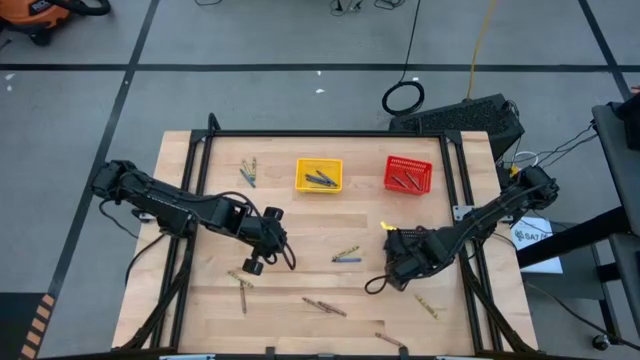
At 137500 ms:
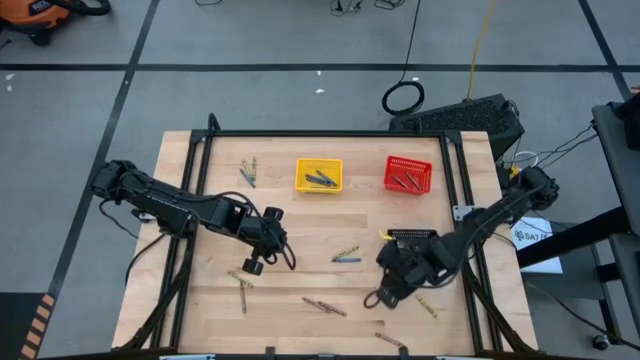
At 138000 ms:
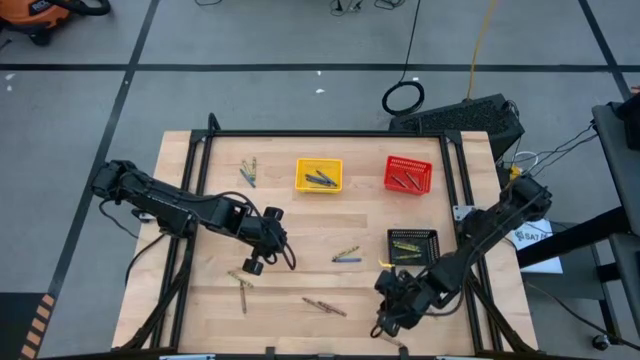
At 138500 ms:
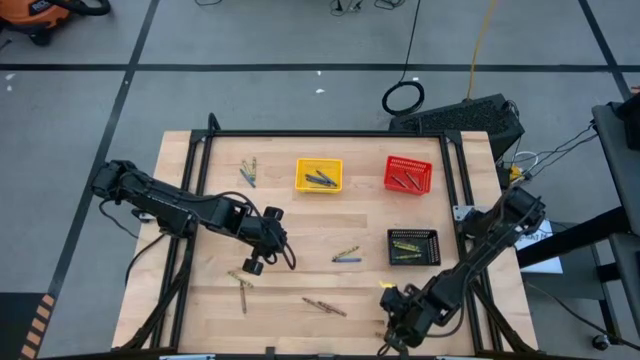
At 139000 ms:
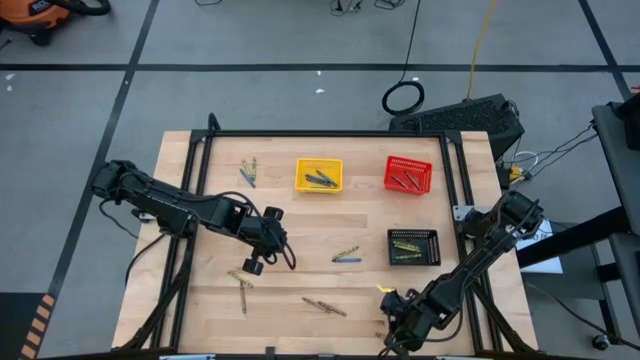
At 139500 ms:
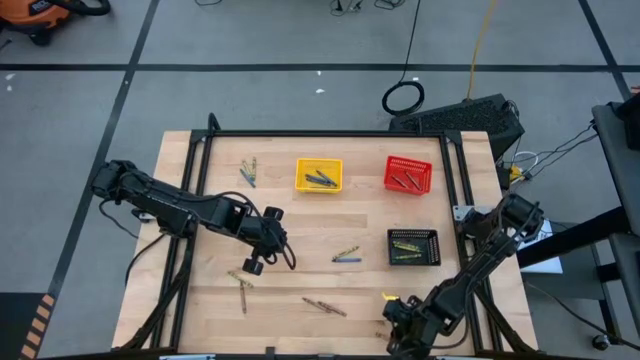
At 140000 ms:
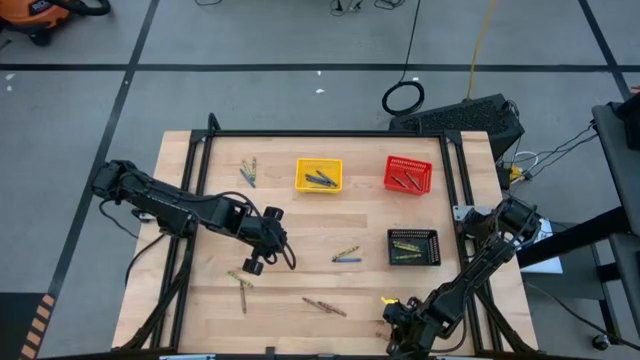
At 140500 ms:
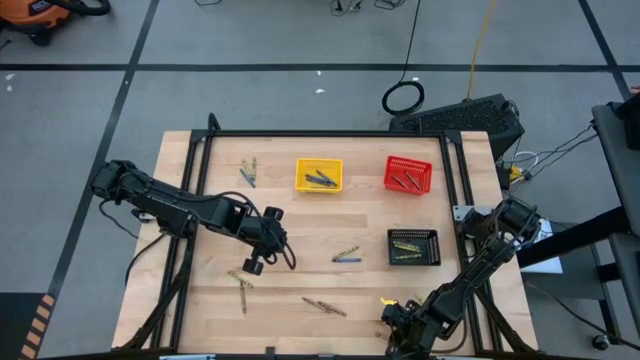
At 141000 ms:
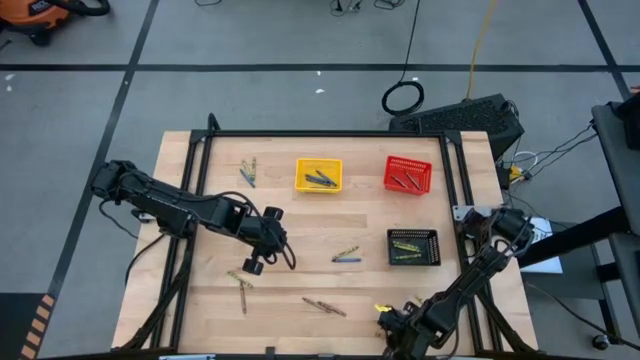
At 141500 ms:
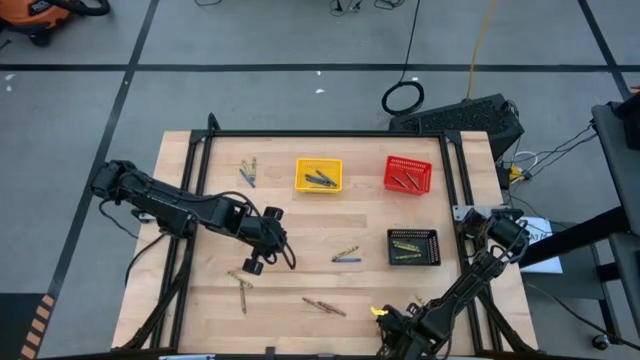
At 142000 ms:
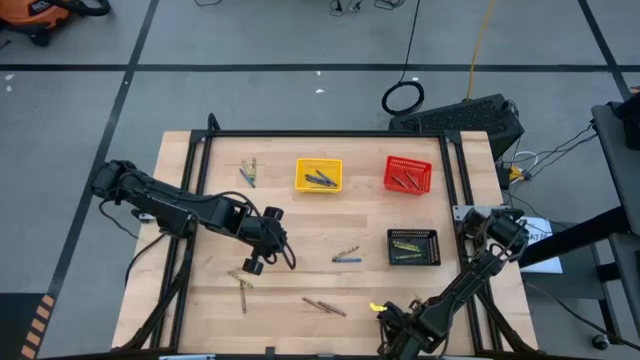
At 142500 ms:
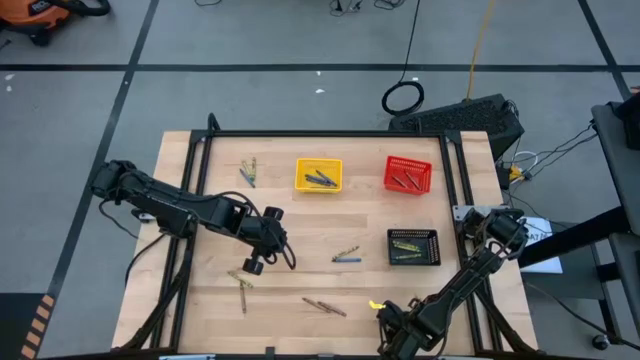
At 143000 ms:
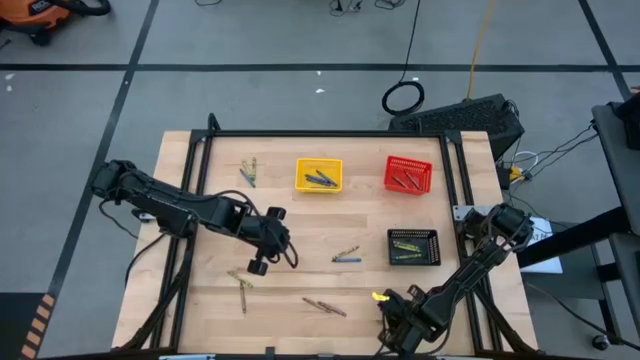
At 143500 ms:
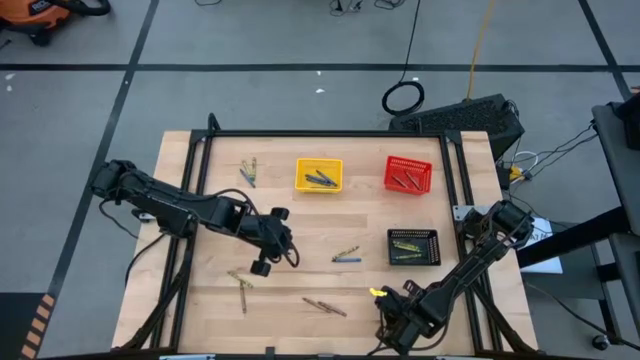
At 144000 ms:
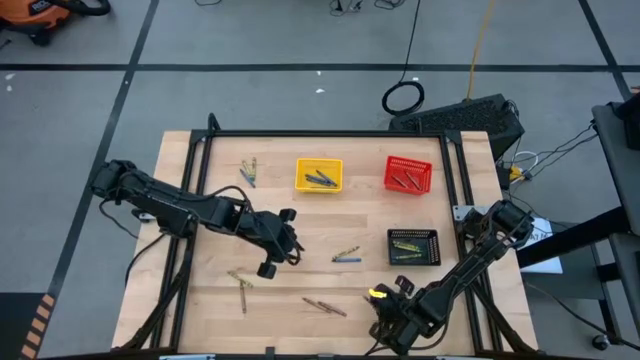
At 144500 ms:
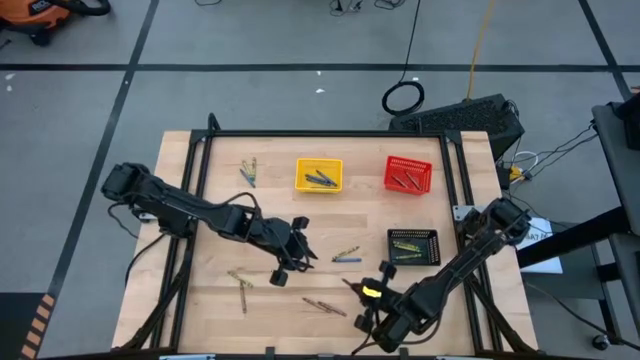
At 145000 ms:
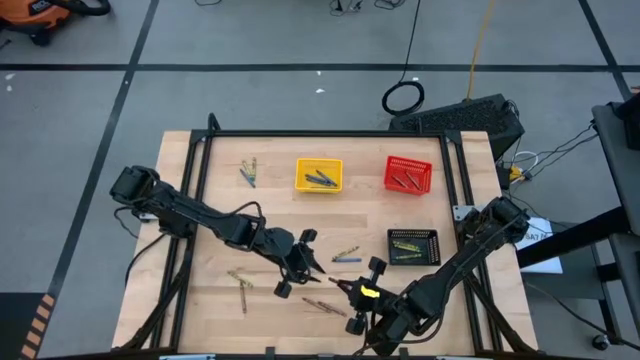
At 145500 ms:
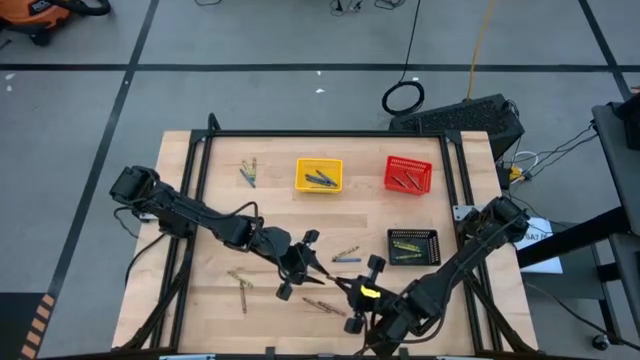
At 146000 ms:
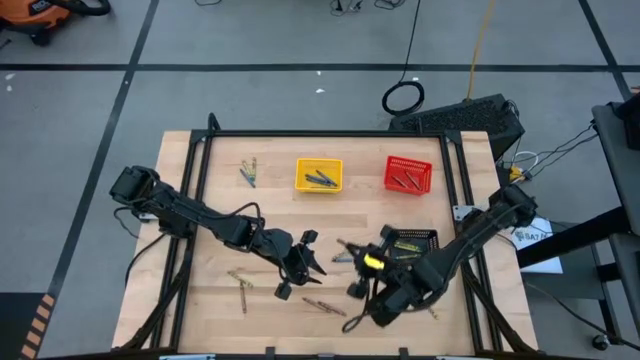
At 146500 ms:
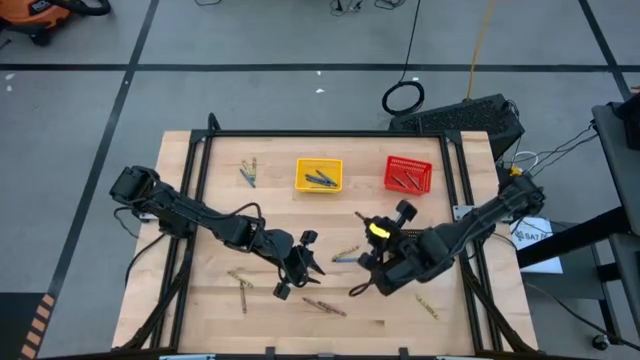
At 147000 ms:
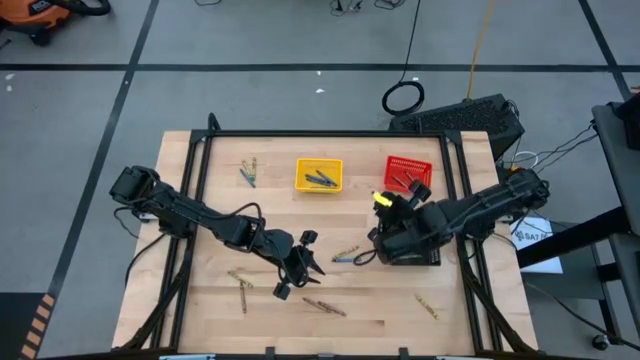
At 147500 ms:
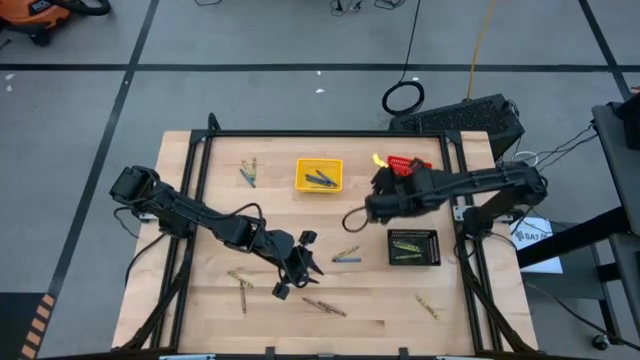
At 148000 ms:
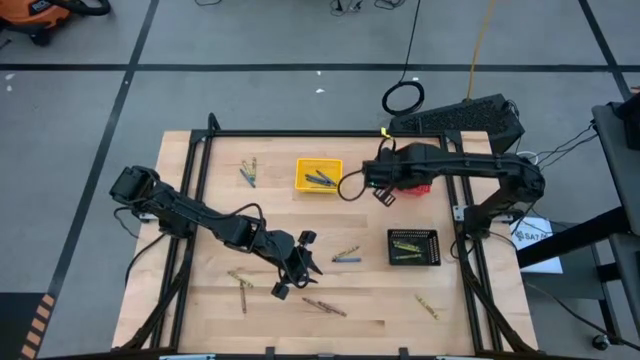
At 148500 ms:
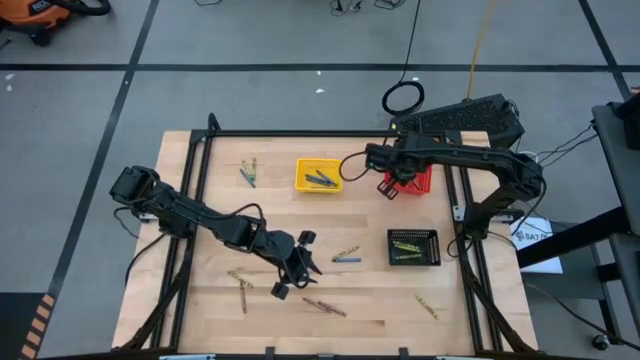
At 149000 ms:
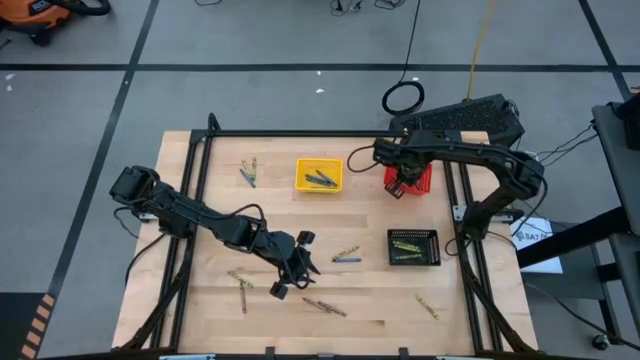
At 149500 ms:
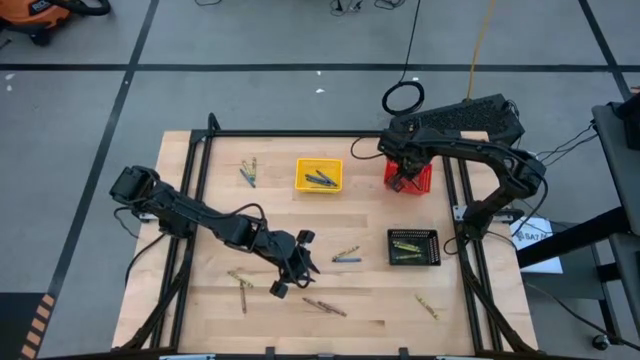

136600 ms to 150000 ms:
Task: Sort crayons
Put the brown crayon into the red bin

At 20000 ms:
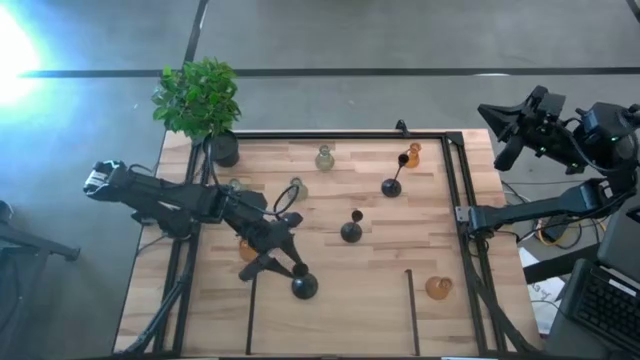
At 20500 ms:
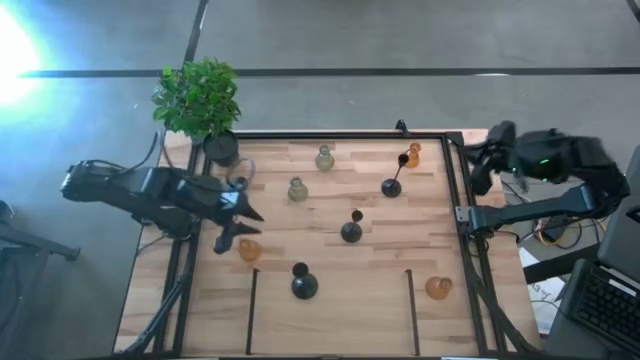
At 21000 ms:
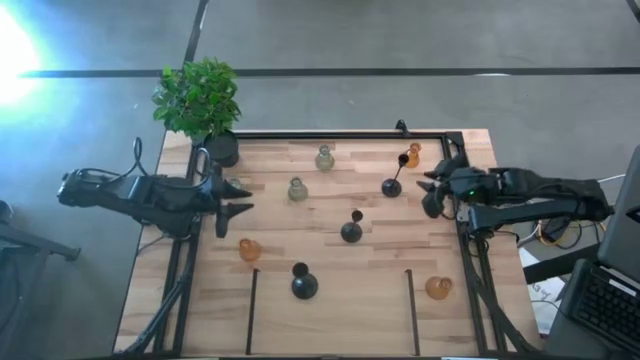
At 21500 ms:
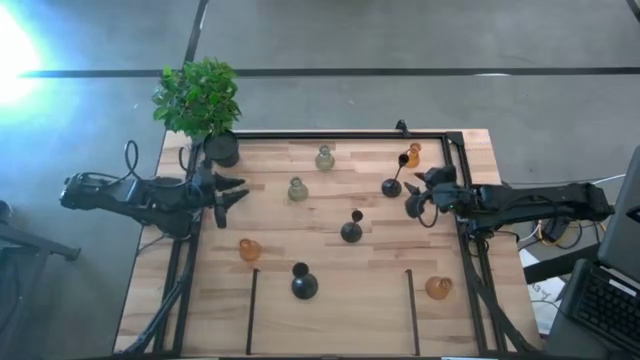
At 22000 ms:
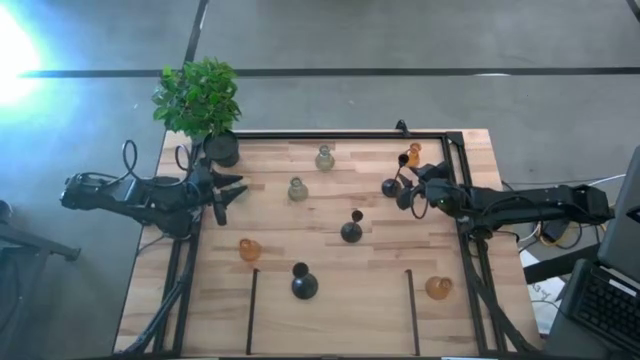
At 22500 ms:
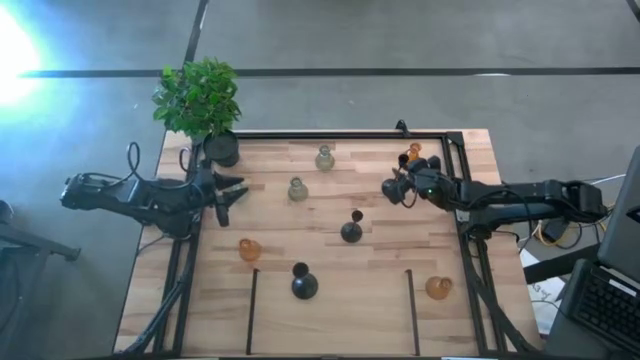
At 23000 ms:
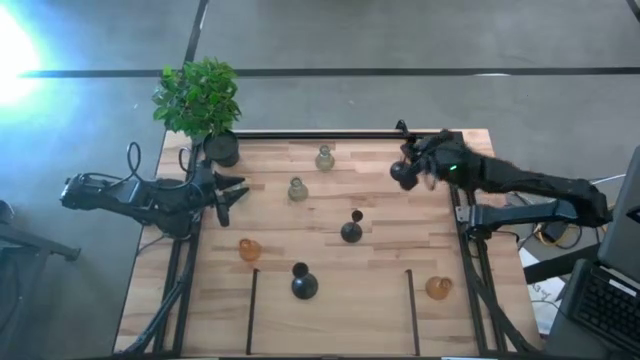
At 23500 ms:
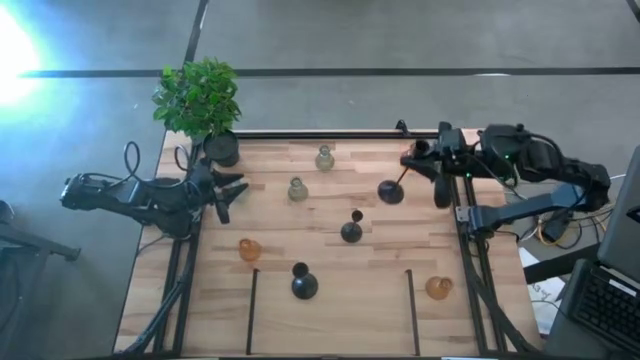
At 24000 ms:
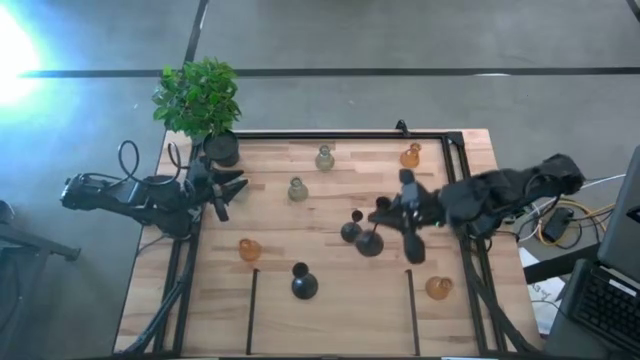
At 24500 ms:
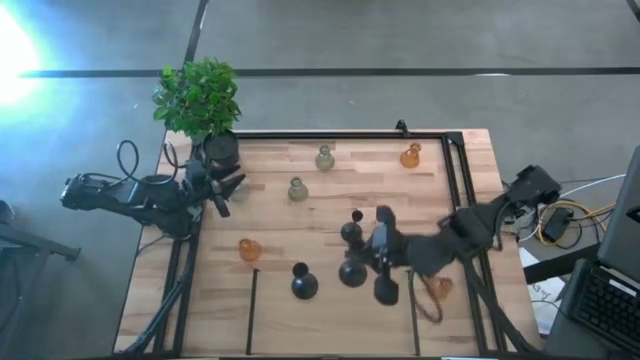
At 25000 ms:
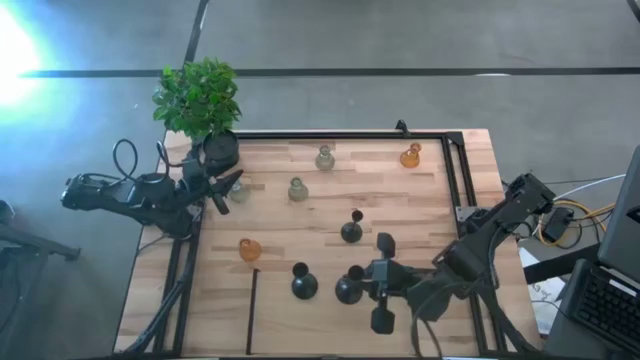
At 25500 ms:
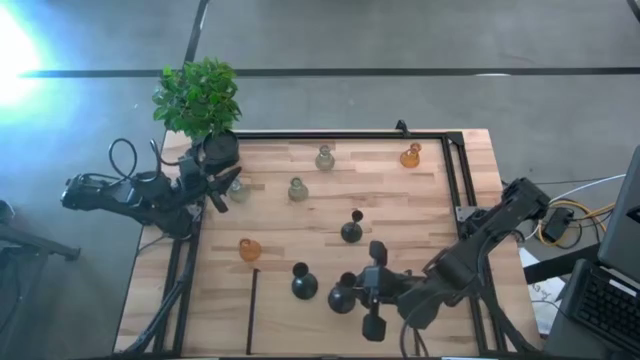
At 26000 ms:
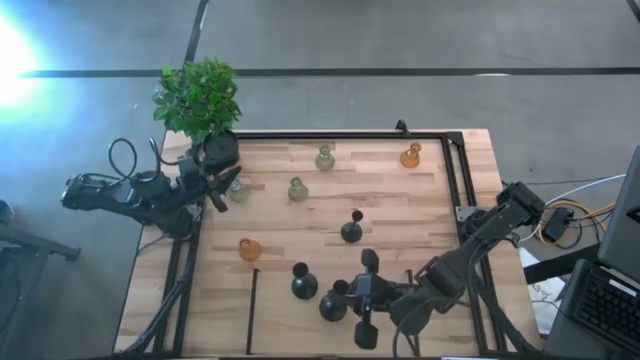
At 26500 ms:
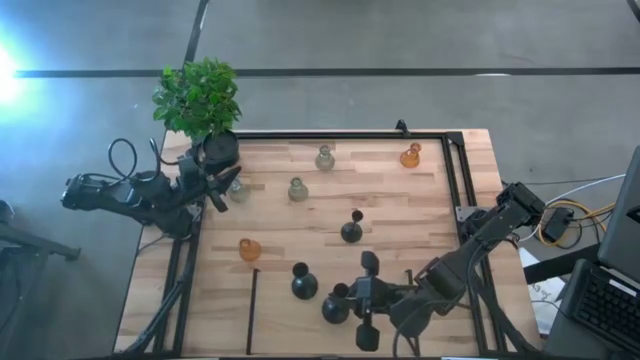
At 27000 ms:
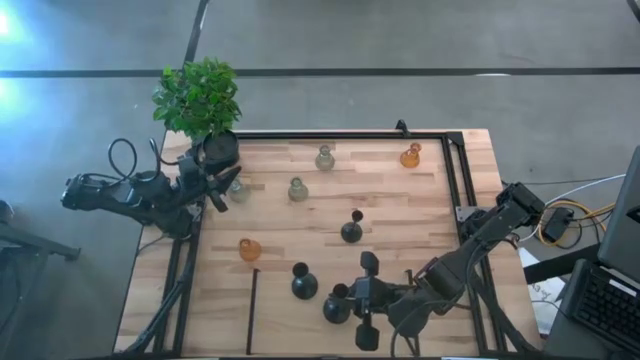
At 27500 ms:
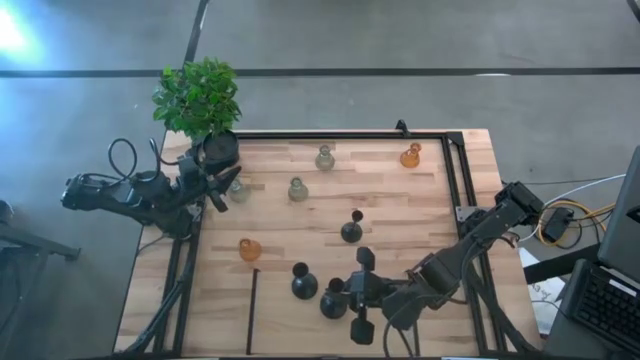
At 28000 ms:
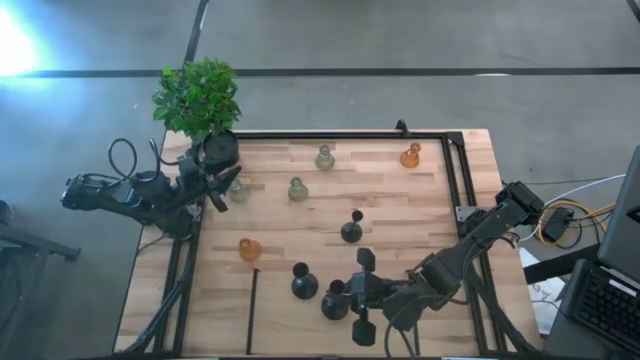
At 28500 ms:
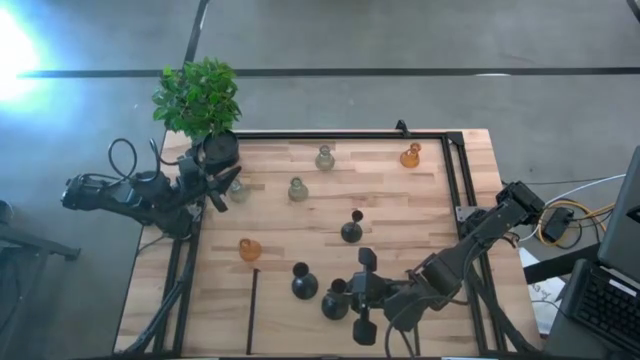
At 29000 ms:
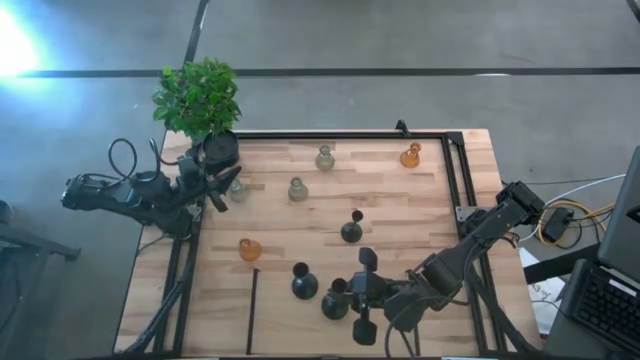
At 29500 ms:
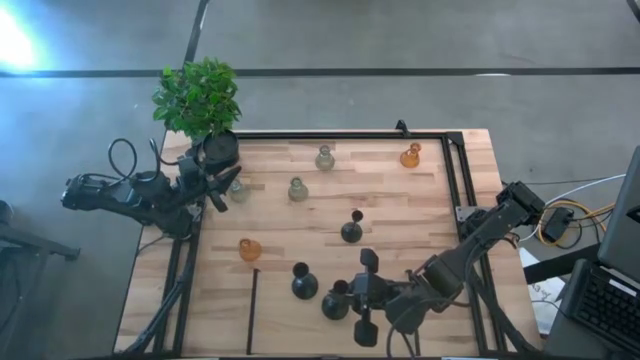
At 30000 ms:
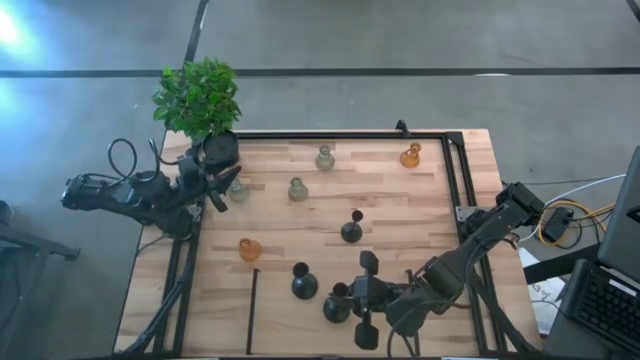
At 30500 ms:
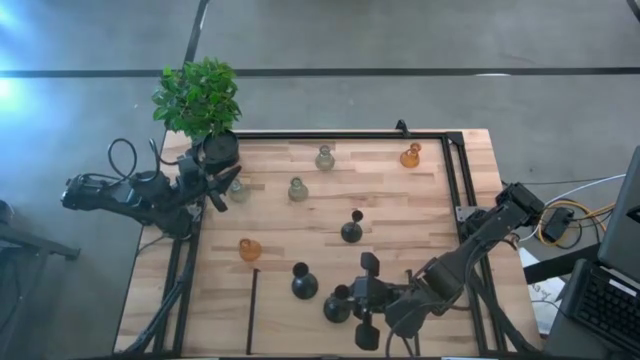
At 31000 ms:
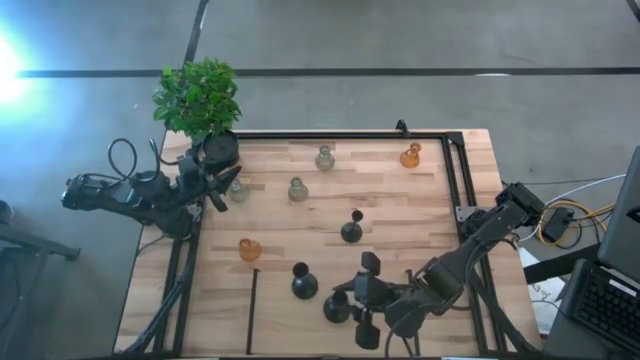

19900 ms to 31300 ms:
Task: Pick & Place candle stick holders
Put the top black stick candle holder on the shelf
